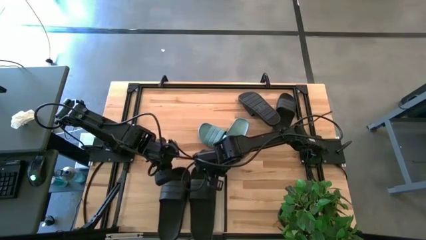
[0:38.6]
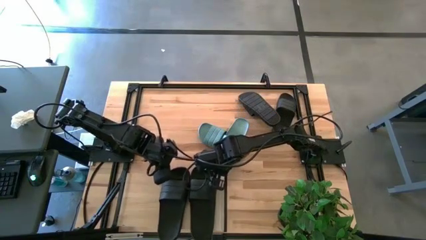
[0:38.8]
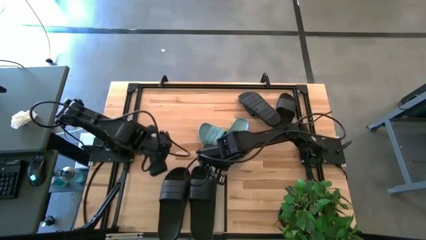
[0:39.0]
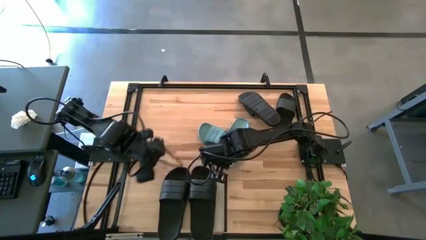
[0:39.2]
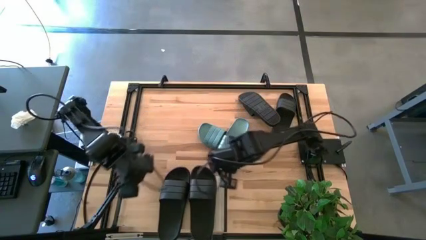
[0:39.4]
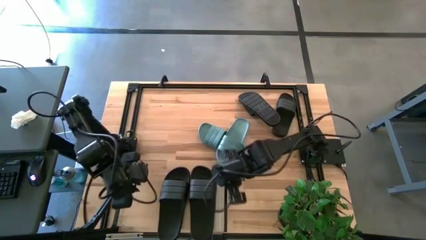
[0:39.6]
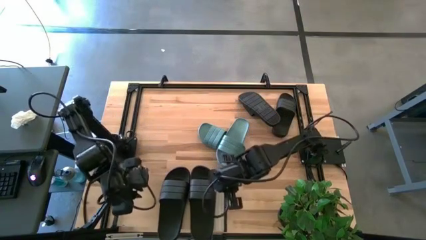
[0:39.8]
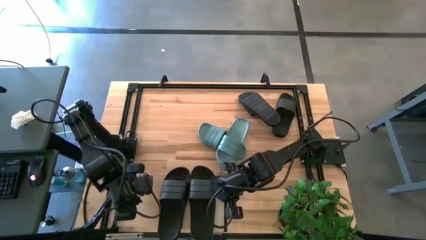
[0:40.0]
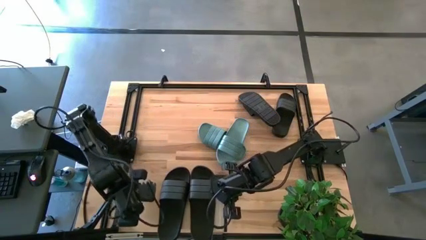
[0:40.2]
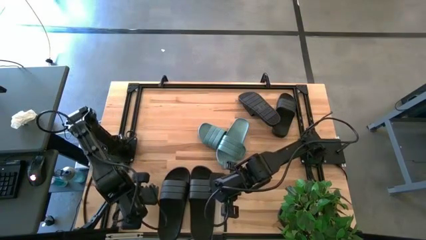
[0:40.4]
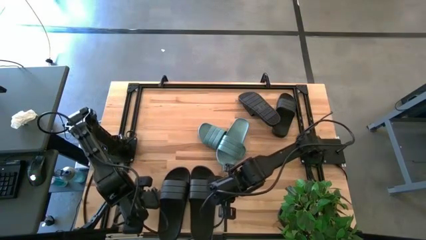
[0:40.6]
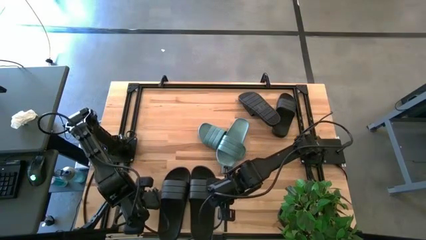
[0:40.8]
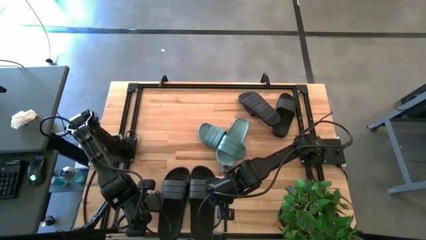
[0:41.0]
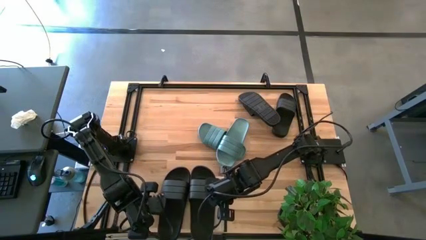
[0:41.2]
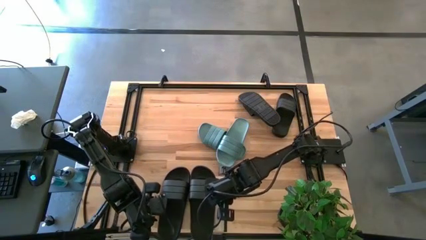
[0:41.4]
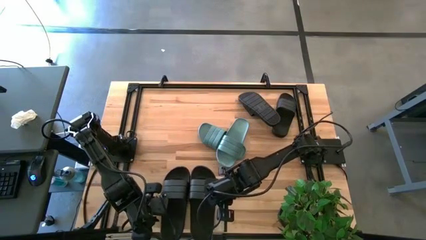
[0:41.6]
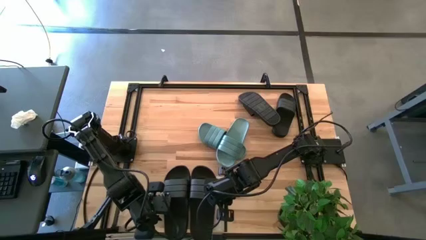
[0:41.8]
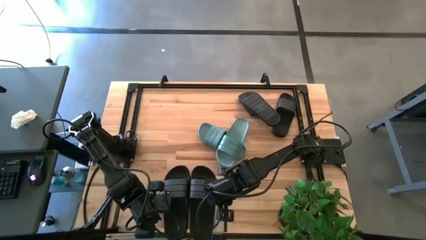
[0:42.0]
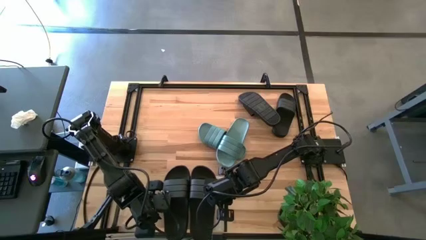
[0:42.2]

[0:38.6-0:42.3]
Task: Pick and place slides into the shelf
Adjust the black slippers on the shelf

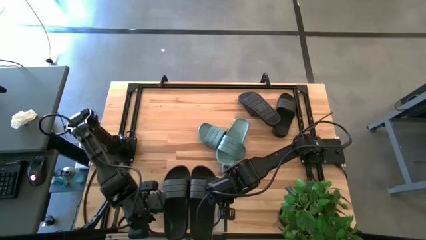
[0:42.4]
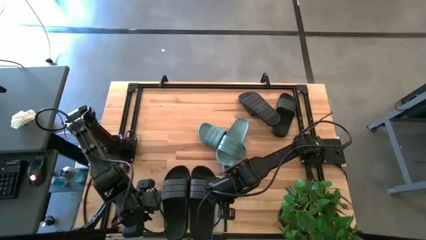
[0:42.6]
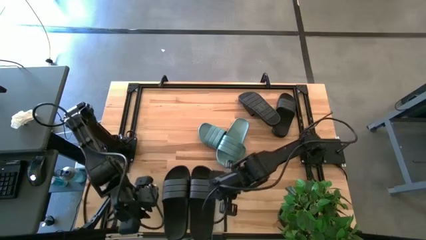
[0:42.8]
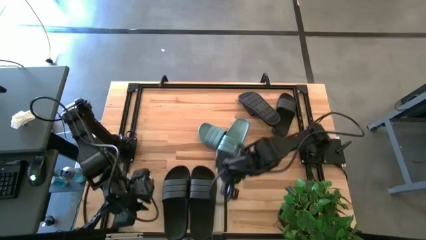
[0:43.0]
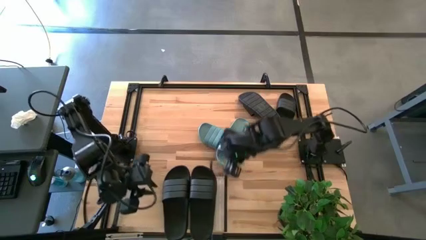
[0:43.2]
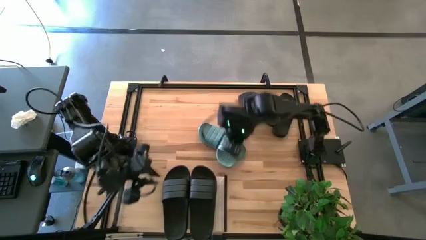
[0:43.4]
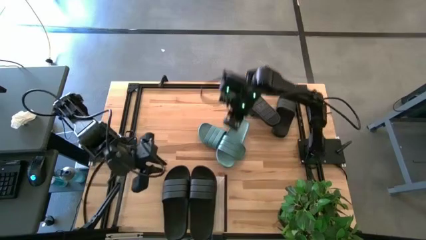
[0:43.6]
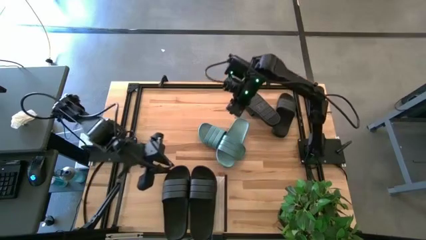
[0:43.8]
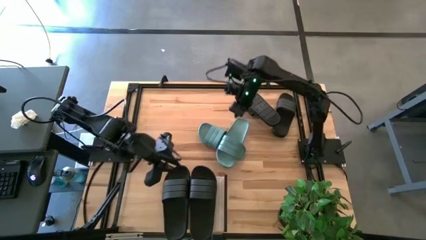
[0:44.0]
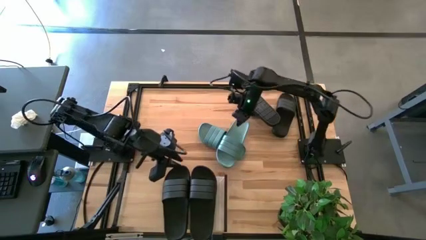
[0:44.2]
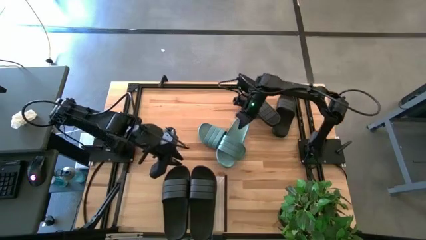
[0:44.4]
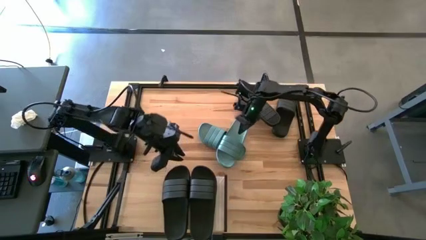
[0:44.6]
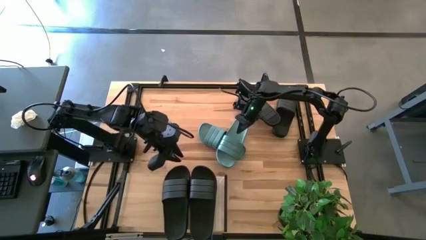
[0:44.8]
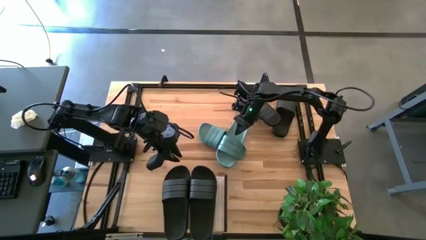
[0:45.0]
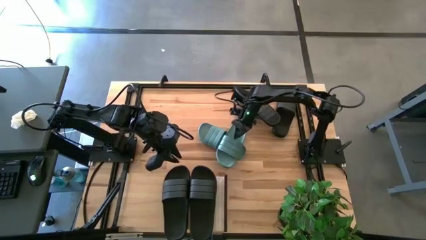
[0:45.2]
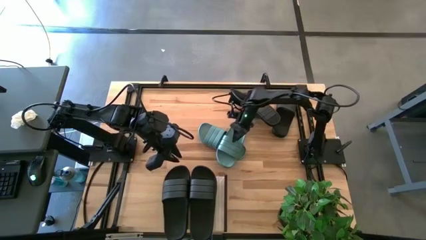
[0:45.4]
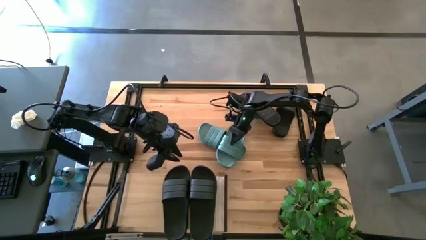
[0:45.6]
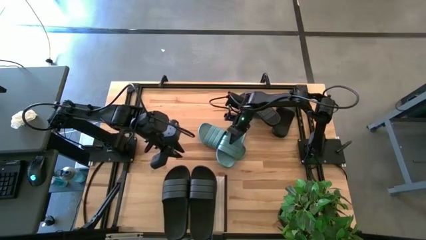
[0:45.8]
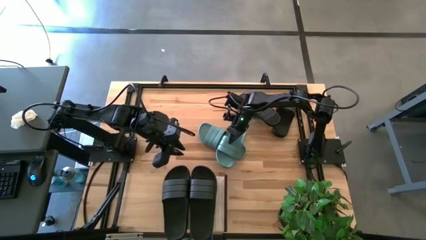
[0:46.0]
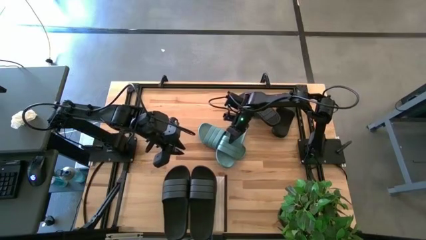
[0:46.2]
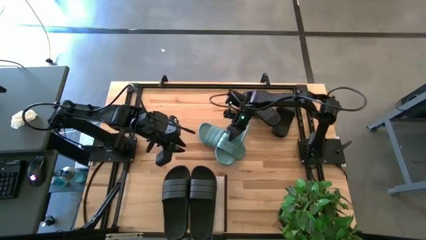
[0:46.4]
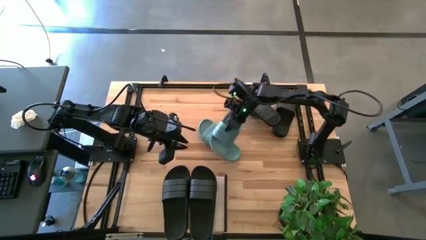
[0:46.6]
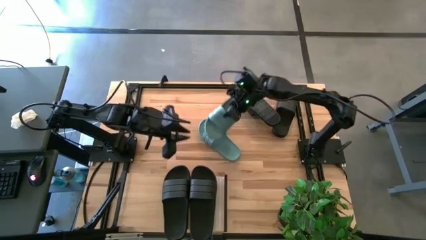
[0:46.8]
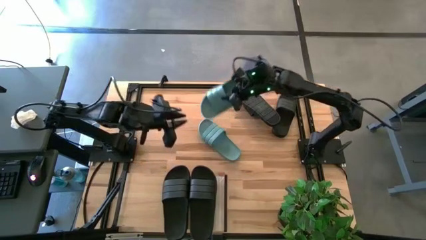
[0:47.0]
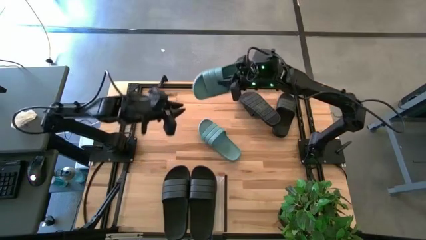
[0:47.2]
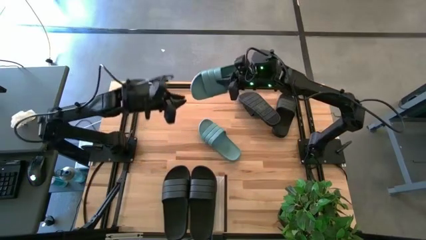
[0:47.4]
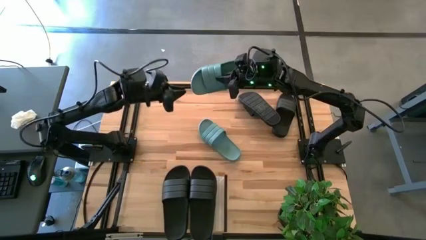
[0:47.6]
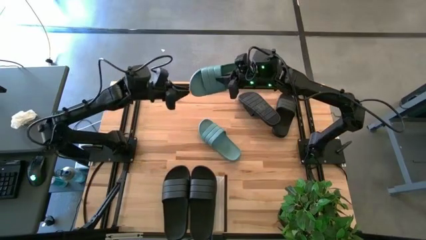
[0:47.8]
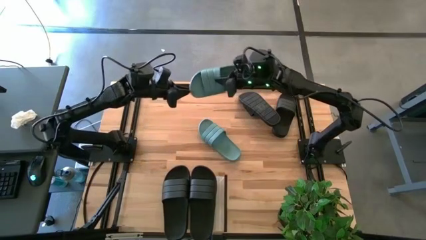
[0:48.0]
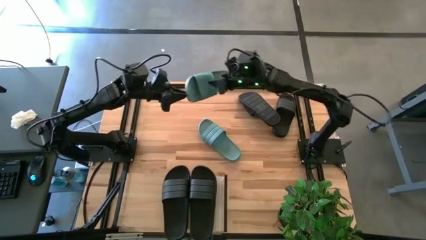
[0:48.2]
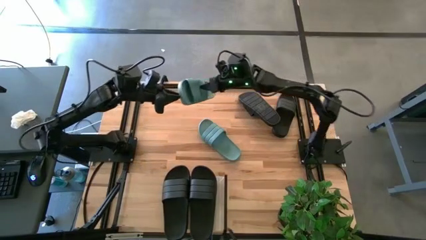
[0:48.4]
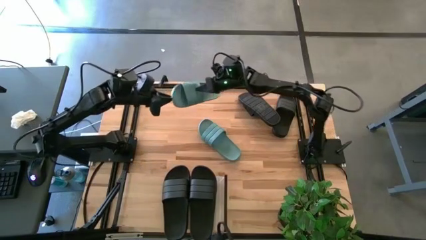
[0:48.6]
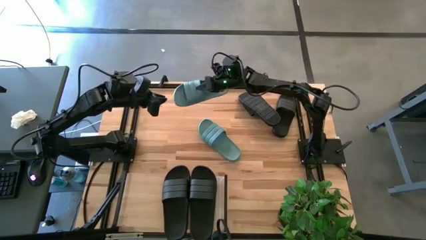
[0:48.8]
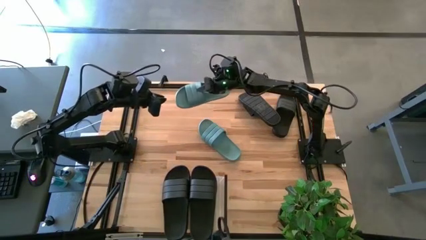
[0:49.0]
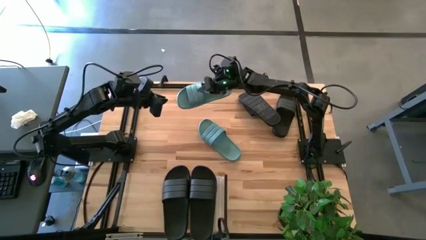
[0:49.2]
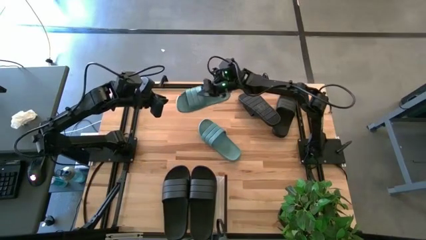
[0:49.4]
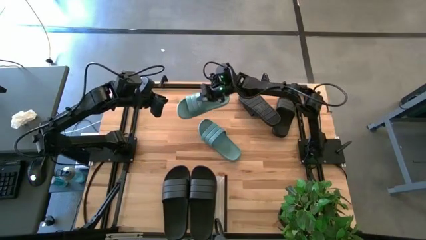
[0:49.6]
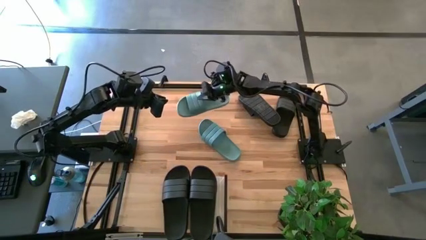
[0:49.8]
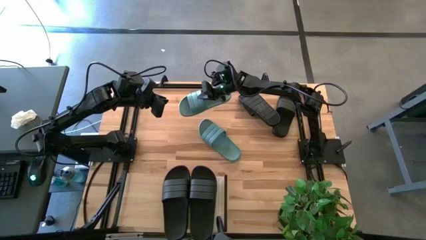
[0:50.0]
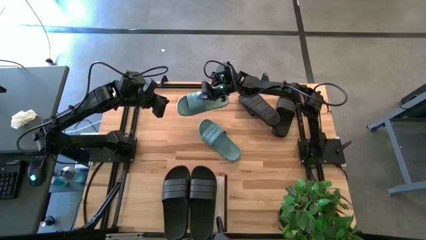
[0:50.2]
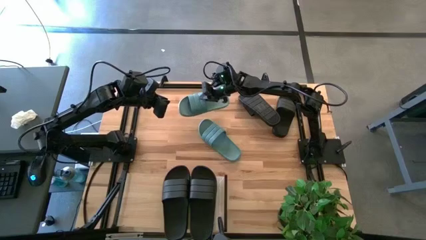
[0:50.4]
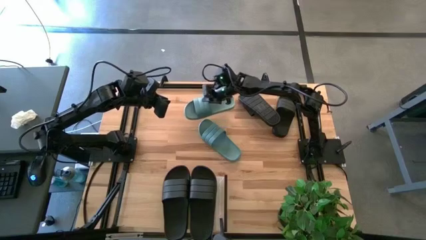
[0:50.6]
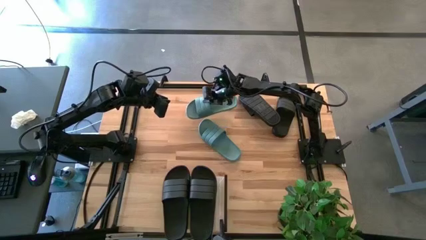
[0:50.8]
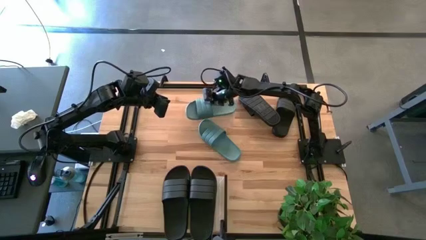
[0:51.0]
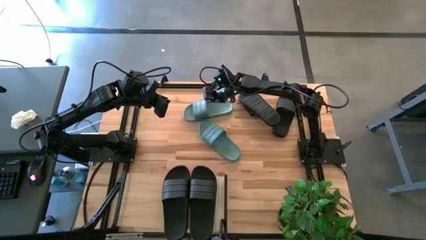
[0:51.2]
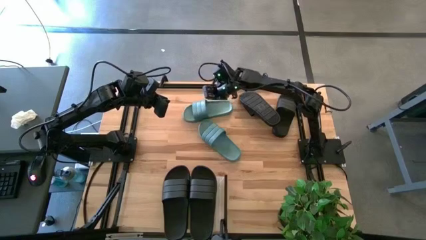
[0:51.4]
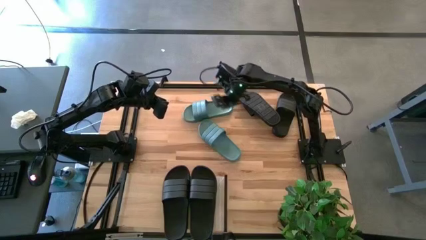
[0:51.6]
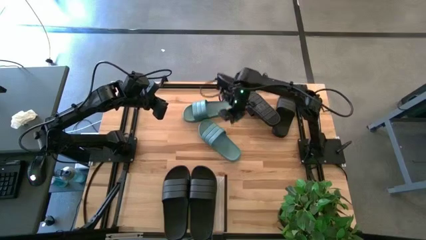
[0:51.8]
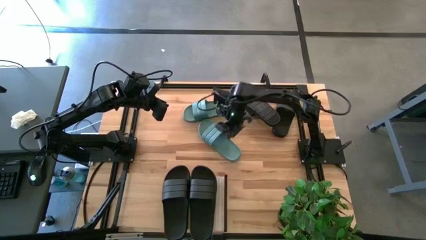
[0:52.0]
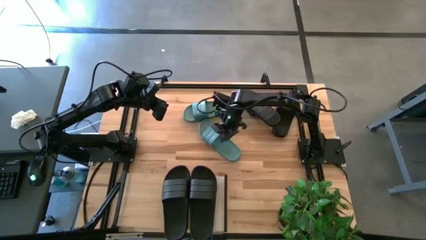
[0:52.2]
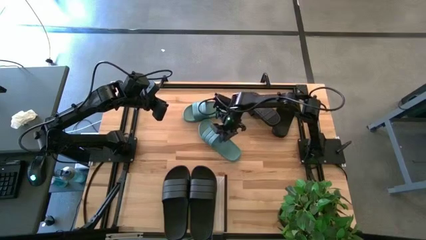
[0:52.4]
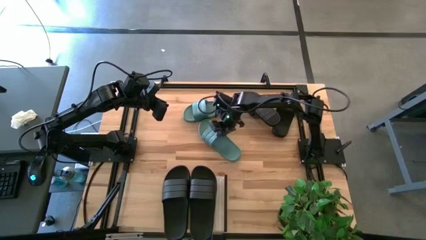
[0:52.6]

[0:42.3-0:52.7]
Put the green slipper under the shelf

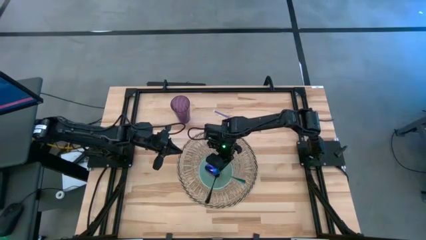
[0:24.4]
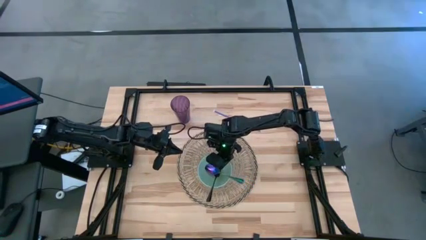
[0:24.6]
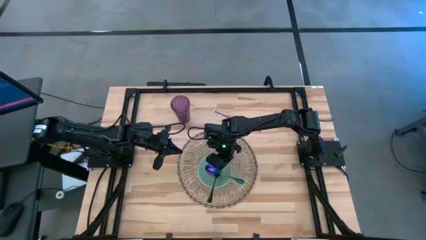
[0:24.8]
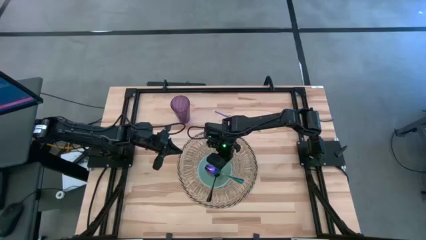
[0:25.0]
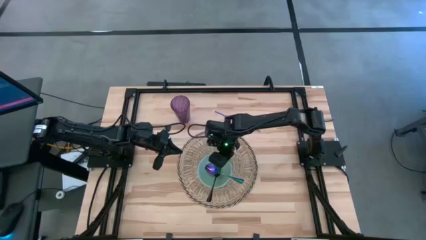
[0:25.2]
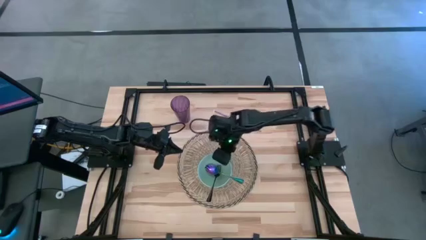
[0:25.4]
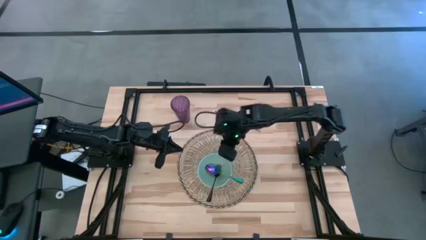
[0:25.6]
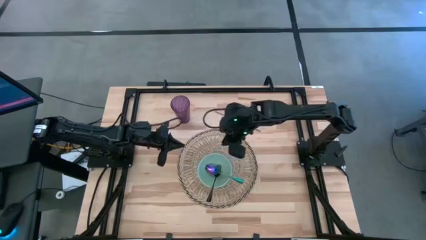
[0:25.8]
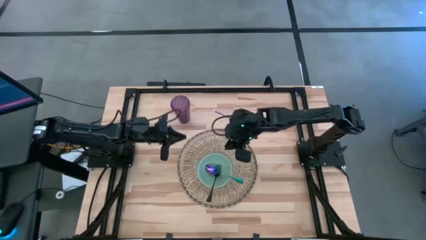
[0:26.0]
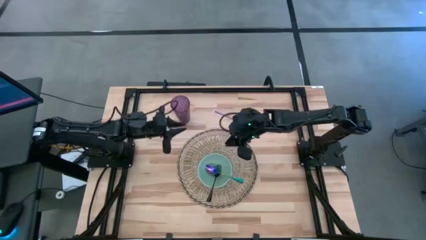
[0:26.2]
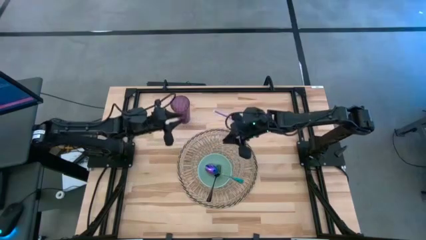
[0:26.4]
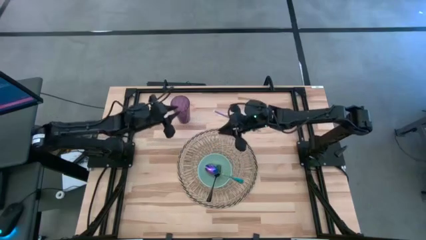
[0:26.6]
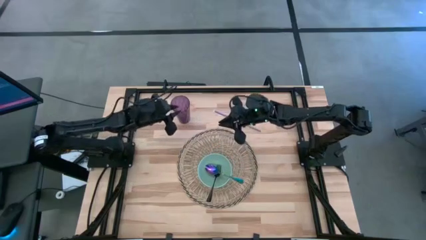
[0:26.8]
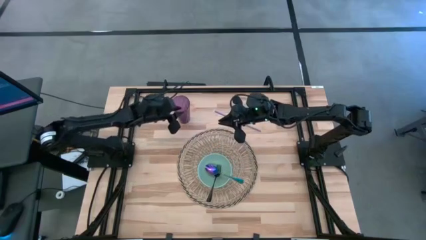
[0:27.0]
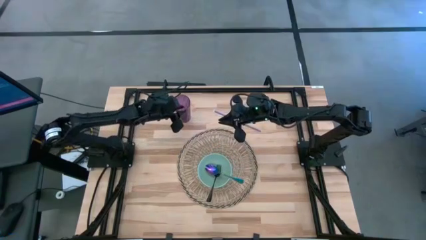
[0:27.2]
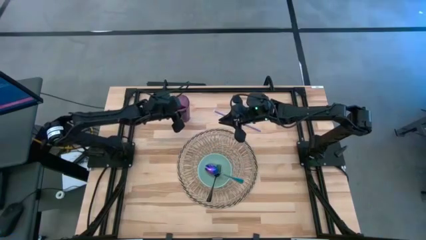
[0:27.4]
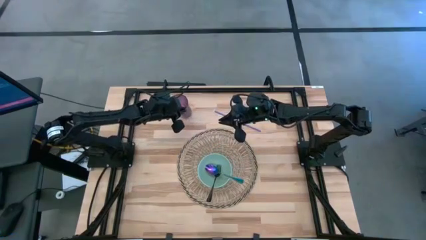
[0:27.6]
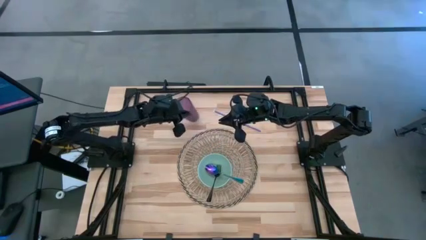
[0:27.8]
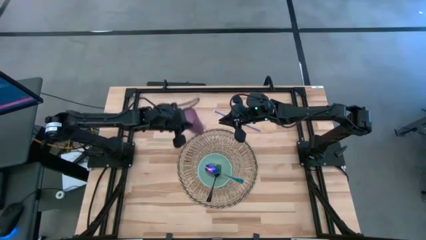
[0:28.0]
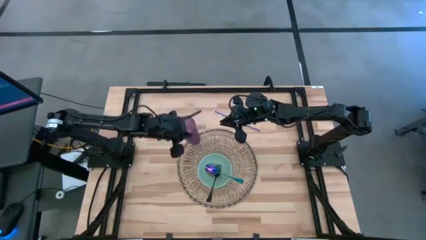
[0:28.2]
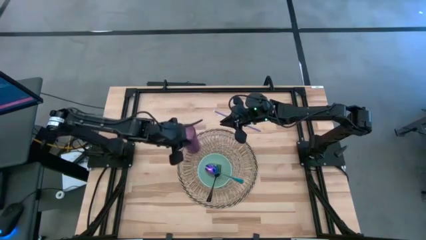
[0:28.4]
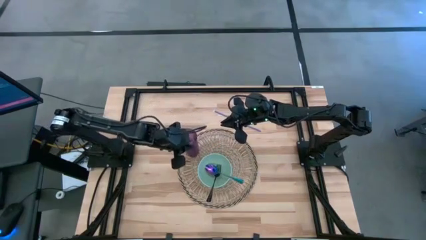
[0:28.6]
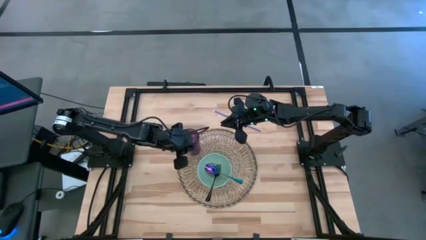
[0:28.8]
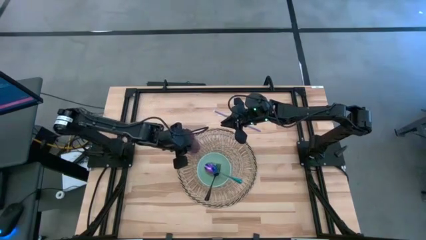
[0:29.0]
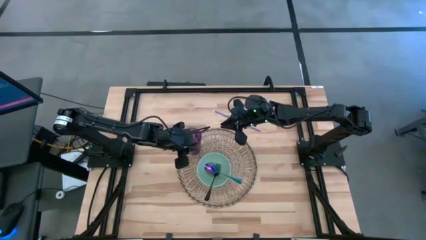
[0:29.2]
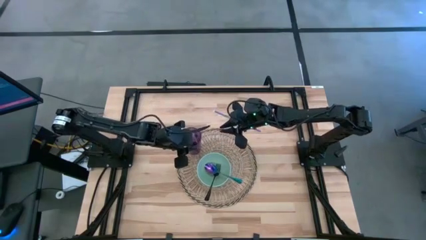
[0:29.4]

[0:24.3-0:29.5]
Task: Pick & Place Utensil
Put the violet cup on the brown mat to the top left of the blue bowl
